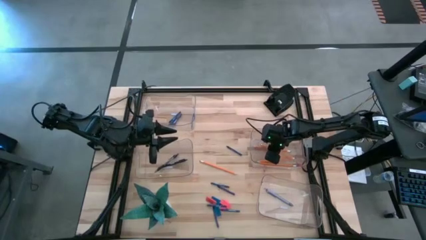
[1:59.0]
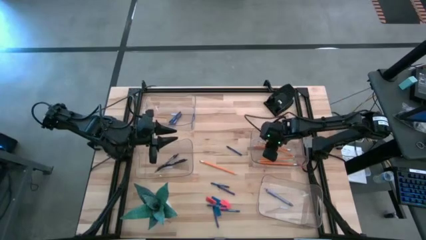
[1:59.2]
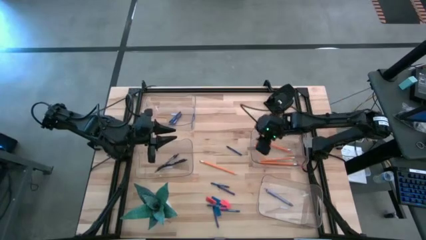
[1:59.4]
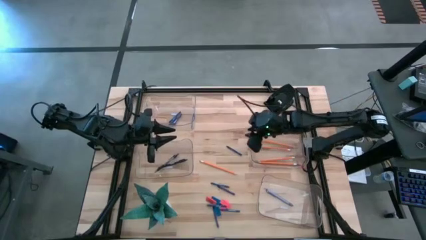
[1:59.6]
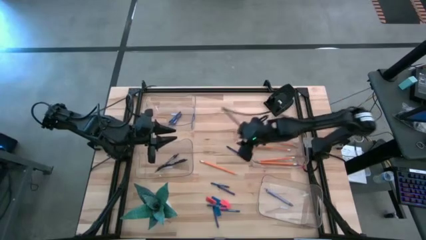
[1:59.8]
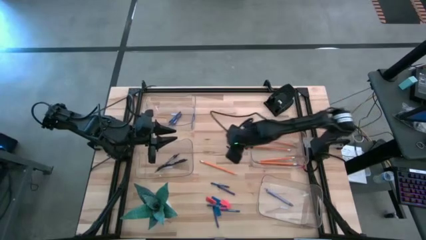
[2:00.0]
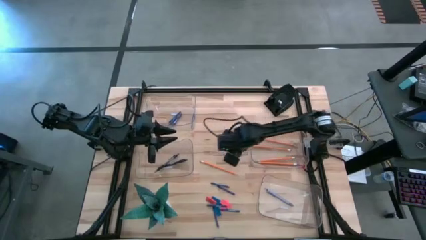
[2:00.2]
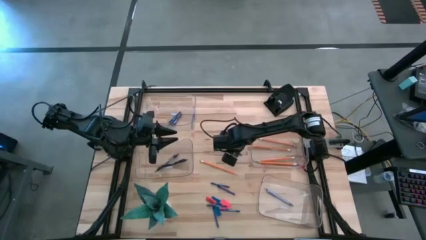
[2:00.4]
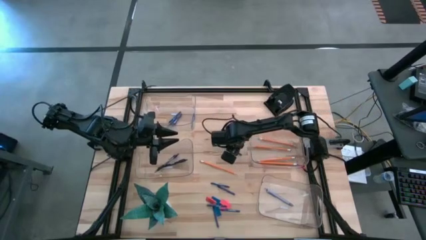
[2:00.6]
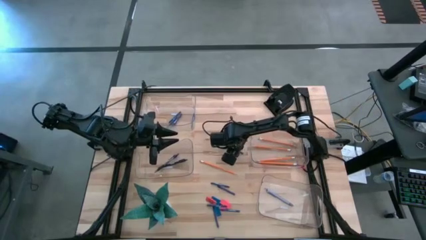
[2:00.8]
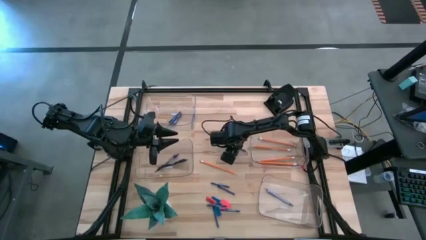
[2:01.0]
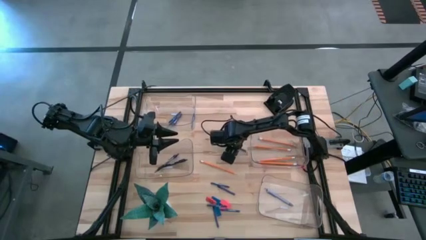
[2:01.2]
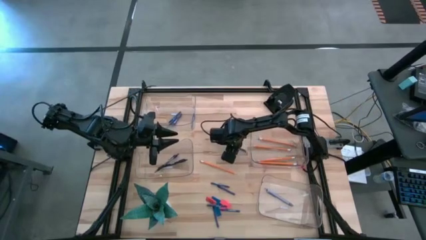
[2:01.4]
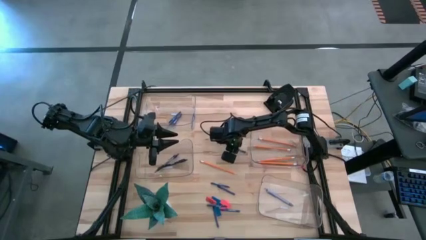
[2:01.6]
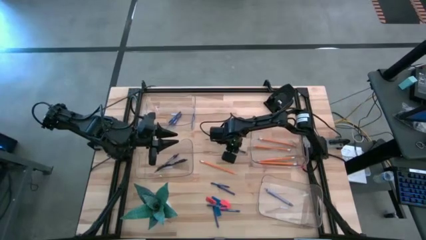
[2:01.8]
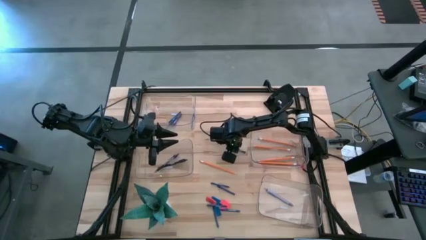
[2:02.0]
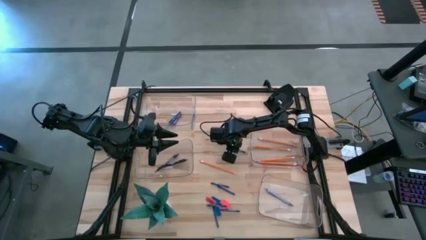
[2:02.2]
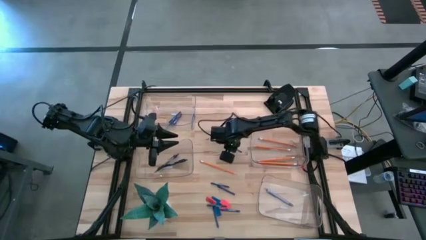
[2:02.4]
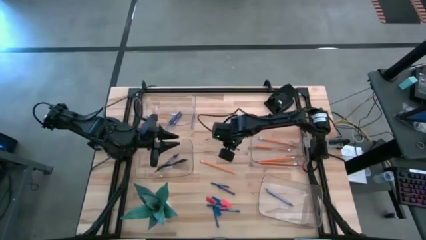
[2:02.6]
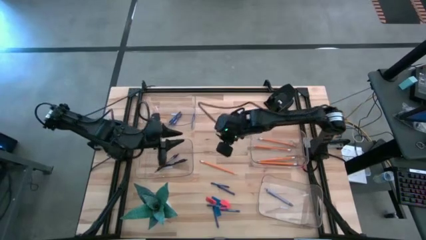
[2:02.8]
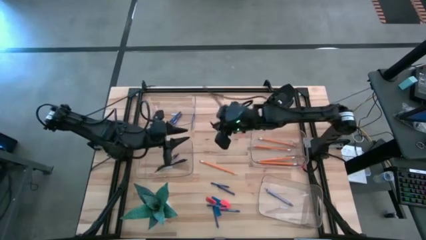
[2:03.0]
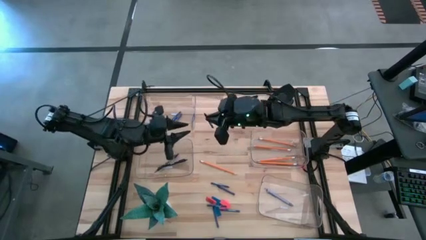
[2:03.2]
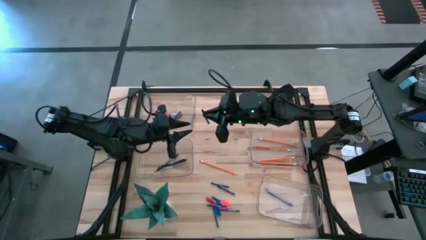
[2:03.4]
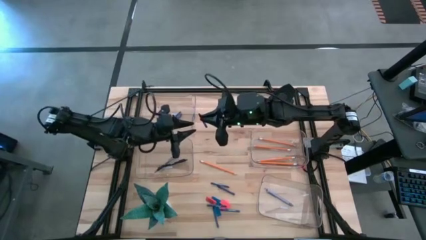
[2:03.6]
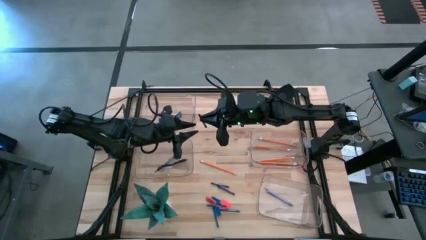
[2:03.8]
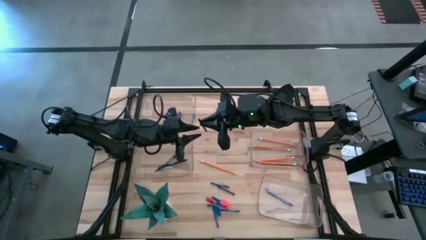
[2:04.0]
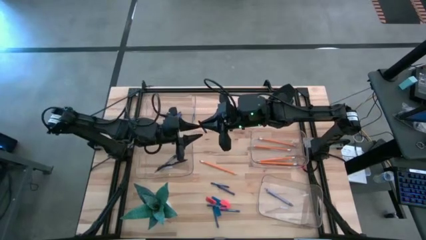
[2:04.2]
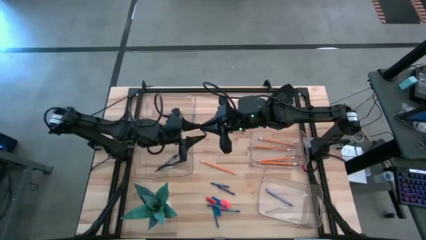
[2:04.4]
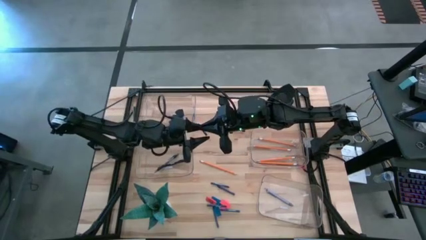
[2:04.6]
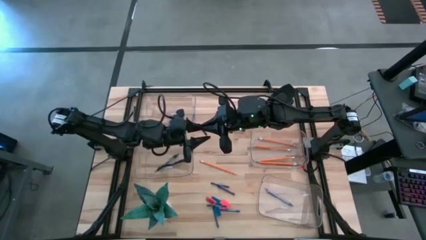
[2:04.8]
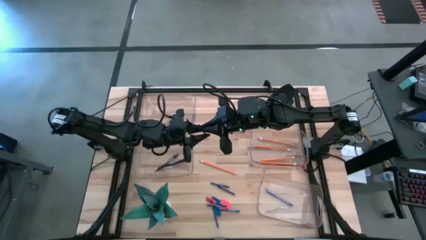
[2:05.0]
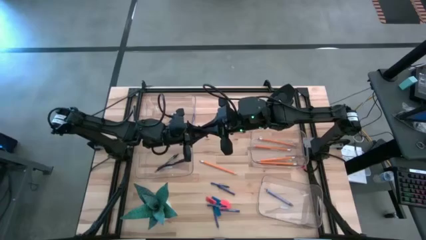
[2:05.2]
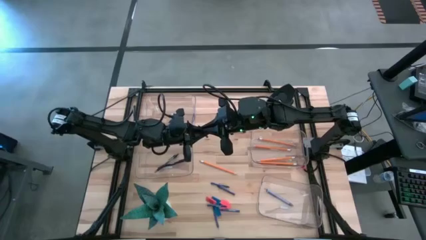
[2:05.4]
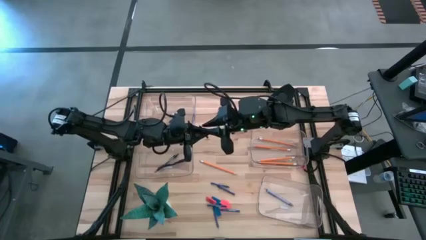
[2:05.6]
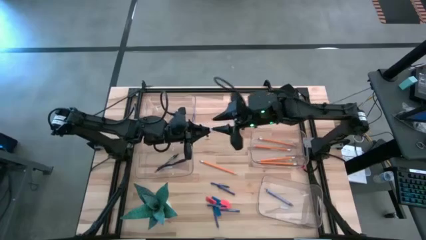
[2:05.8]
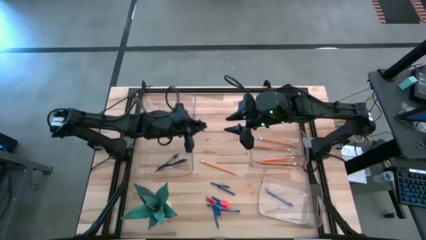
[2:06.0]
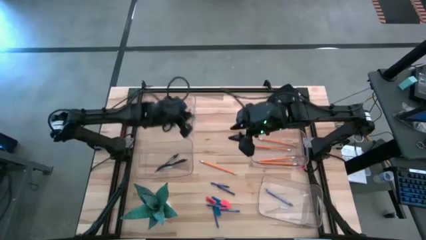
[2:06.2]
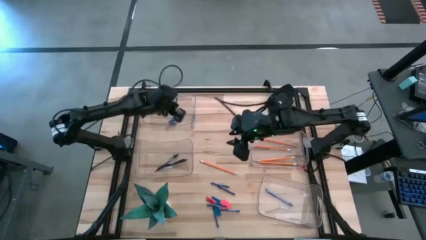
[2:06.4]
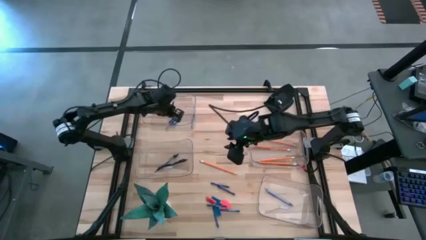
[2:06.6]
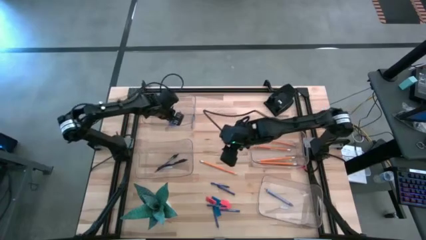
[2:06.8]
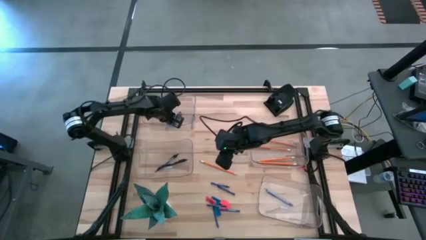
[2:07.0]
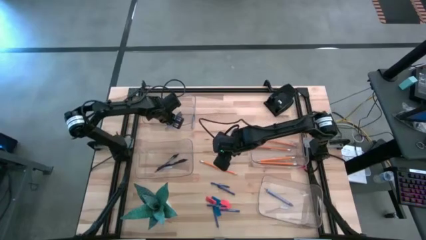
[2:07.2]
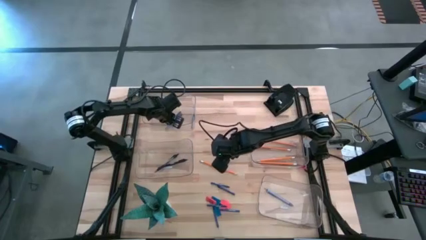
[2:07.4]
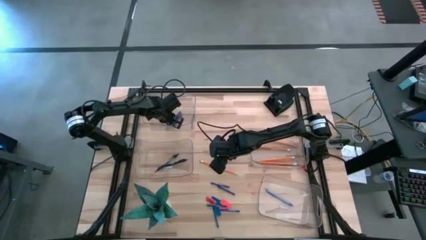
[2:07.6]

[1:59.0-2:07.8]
Task: Sort crayons/erasers/pens/pencils in bins
Put the blue crayon into the top transparent bin

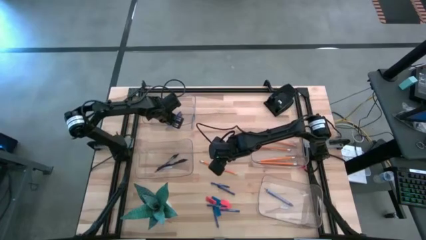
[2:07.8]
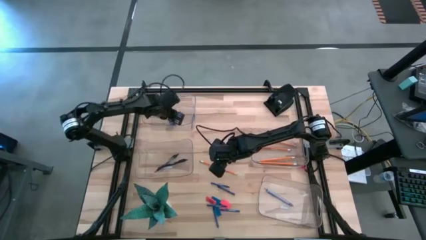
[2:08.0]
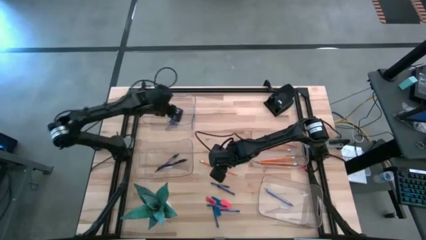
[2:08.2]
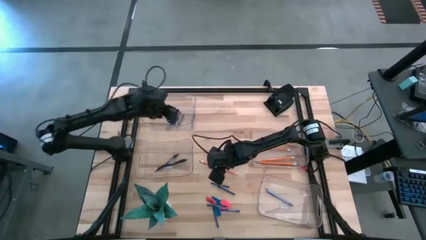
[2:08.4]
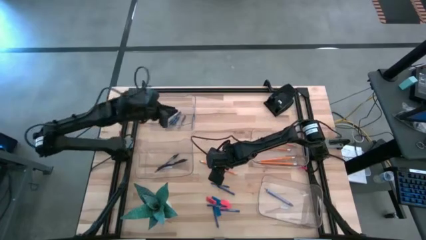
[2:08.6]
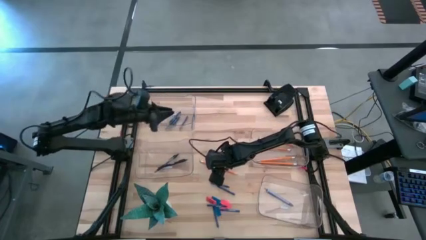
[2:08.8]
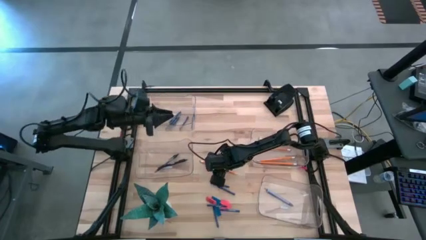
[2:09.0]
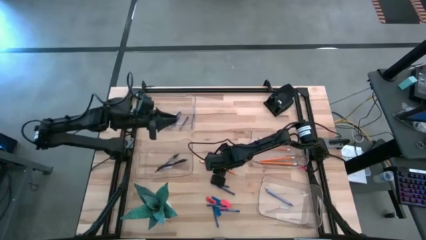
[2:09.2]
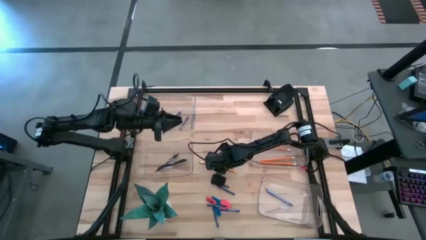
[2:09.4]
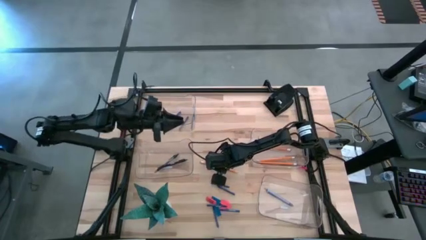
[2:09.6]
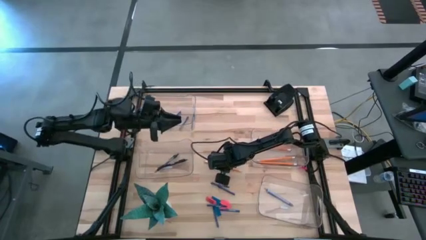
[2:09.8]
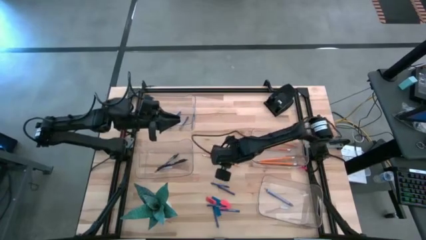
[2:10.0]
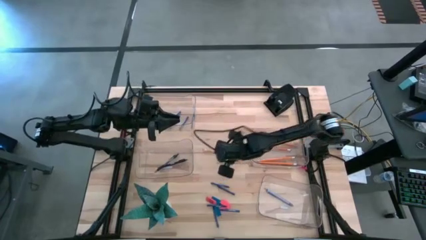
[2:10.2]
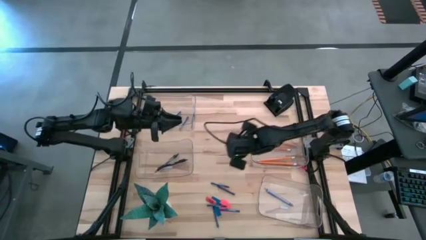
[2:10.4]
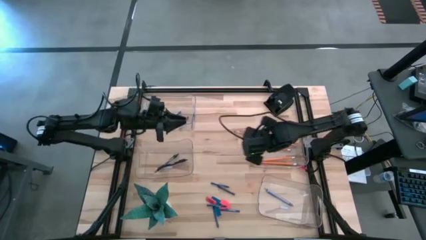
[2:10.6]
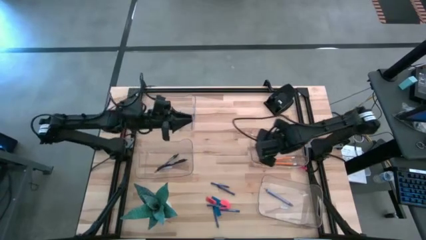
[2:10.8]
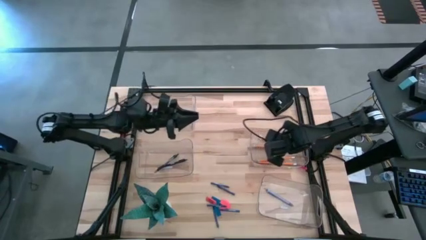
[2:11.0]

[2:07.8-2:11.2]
Put the orange pencil into the middle right transparent bin

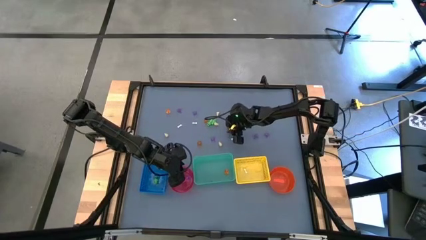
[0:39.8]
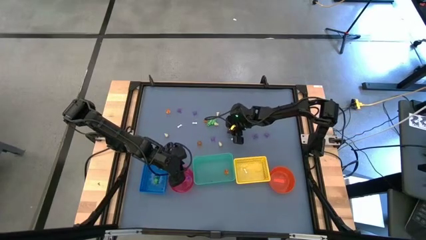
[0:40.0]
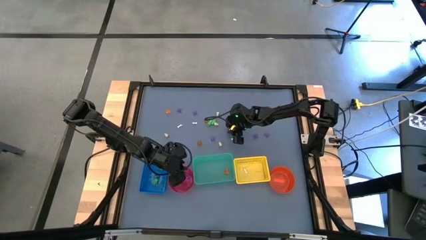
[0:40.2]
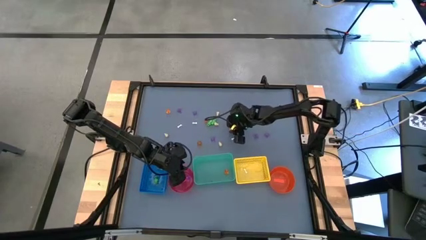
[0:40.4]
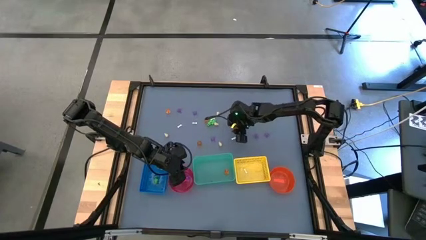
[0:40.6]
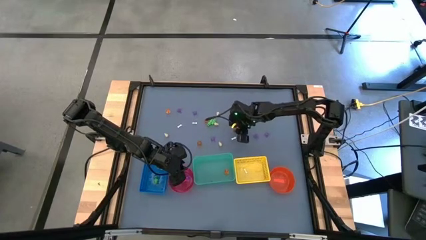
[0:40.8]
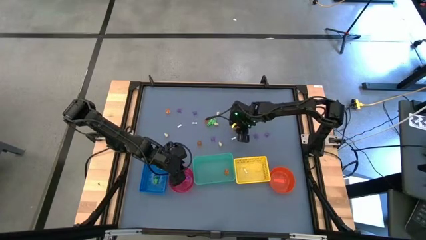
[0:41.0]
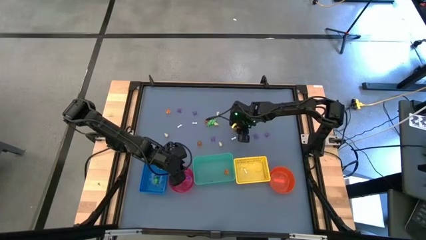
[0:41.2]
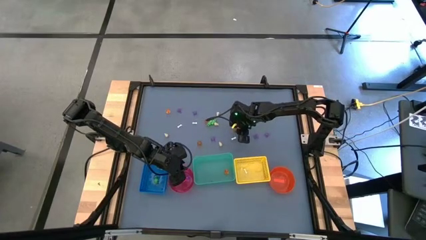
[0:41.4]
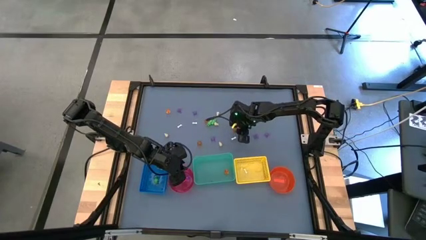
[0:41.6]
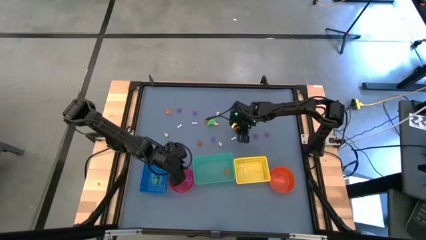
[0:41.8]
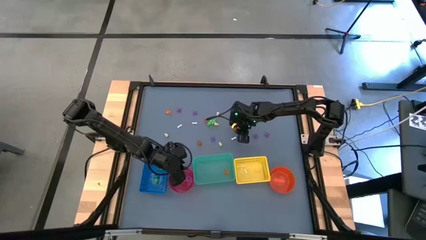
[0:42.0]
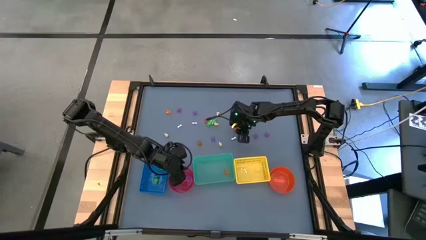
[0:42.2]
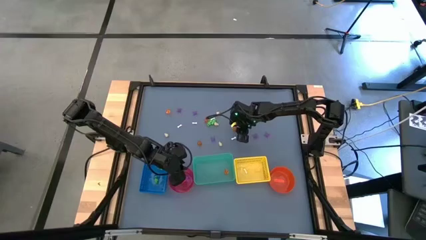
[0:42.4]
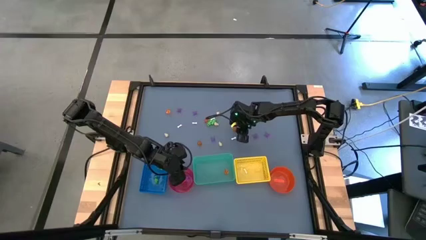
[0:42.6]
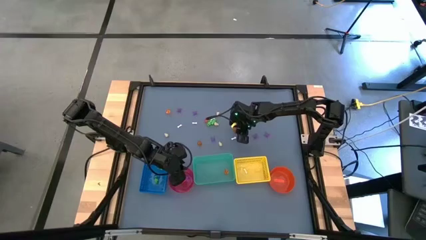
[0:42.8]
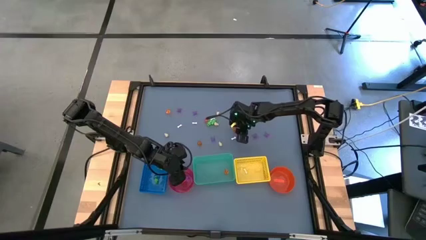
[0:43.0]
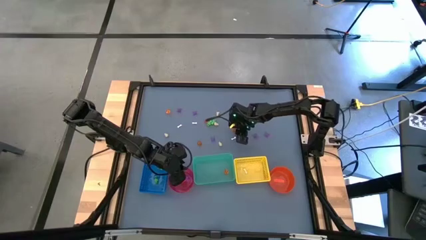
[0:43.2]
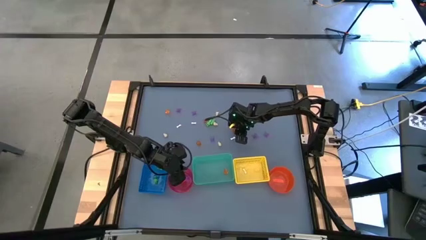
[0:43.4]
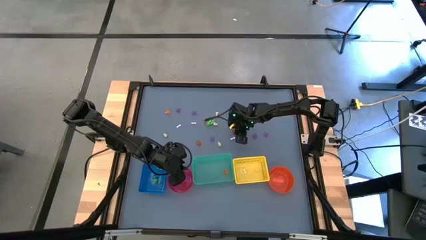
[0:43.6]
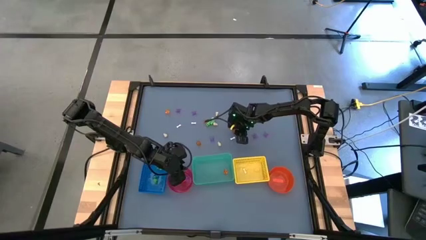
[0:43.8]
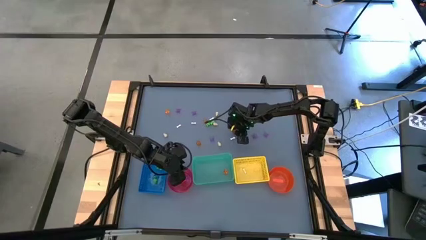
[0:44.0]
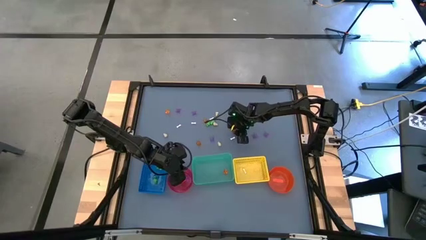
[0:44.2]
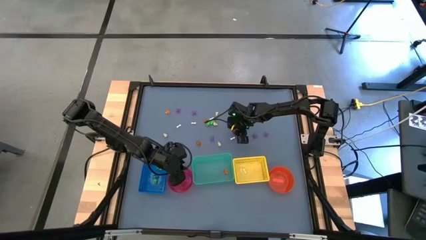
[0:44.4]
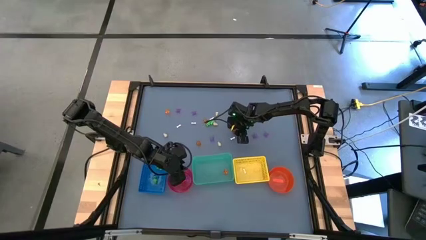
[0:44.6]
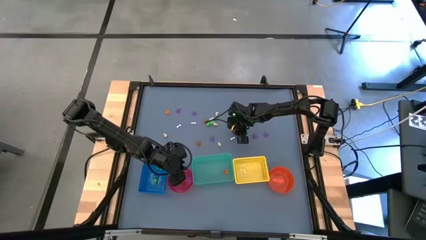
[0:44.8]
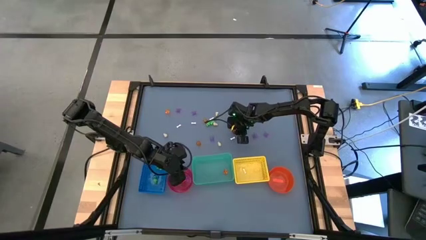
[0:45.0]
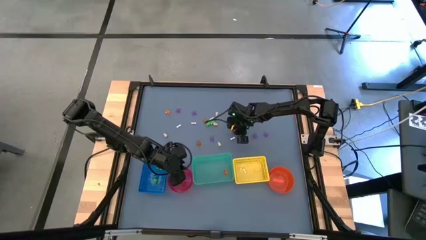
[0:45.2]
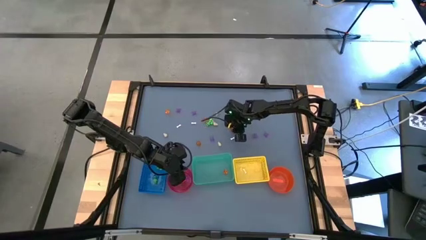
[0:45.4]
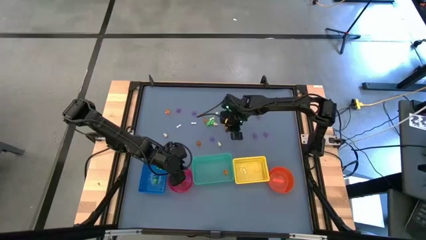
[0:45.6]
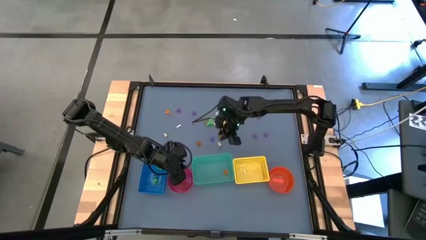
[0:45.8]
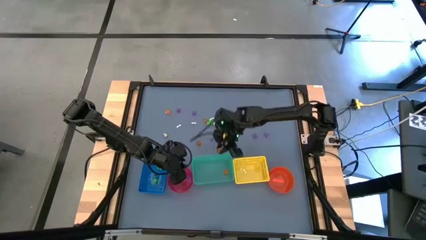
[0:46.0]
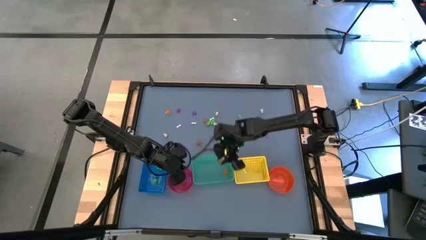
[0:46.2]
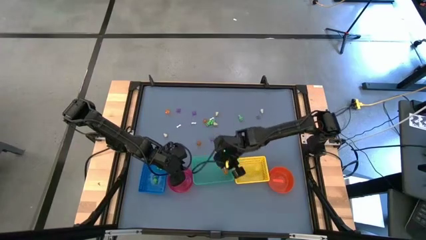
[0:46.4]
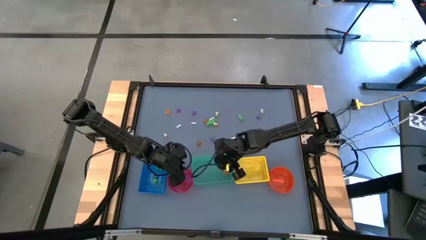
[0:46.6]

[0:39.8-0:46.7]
Task: Sort Halloween decoration
Put the orange pumpkin toy into the green bin
